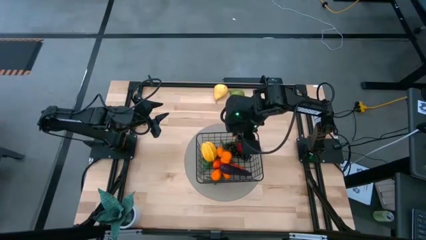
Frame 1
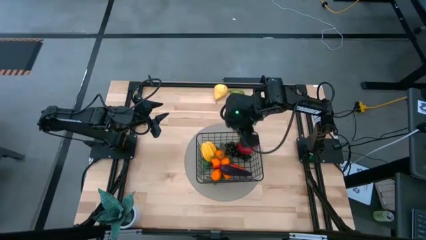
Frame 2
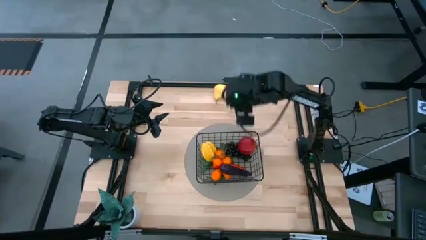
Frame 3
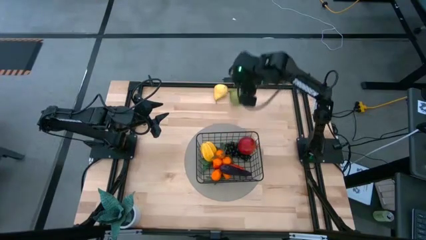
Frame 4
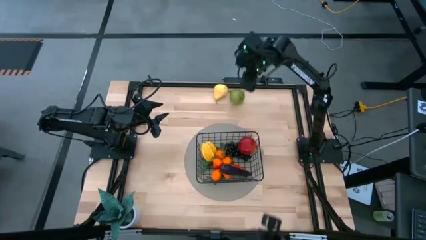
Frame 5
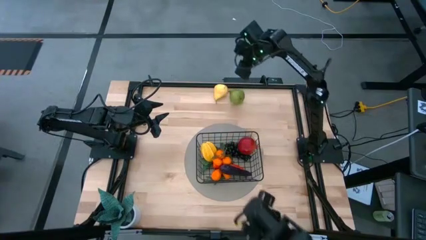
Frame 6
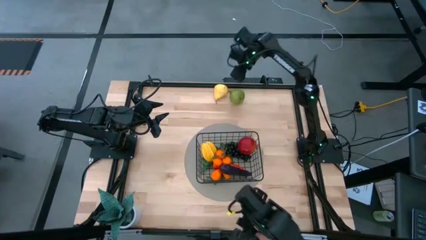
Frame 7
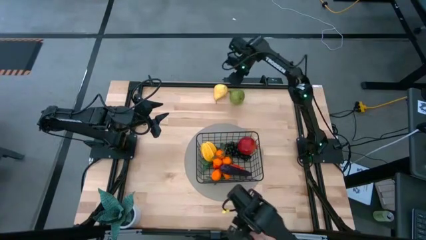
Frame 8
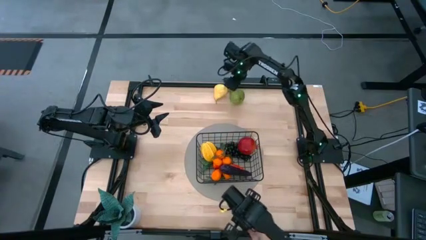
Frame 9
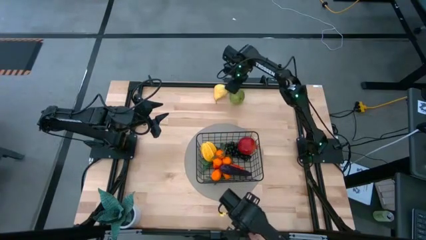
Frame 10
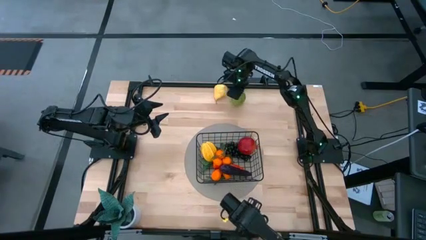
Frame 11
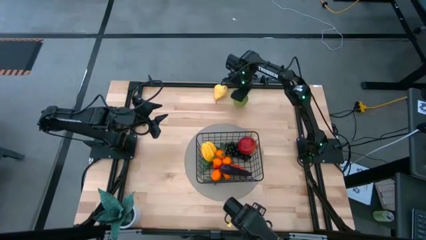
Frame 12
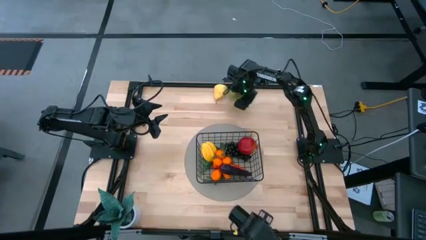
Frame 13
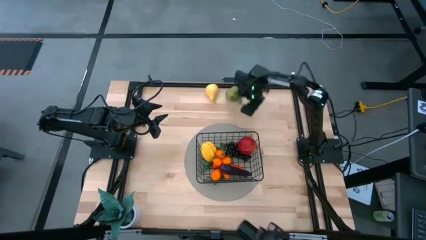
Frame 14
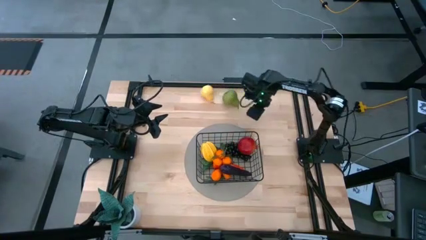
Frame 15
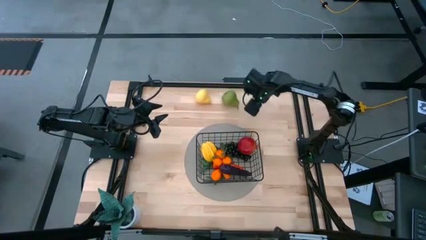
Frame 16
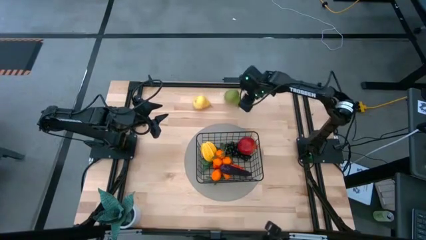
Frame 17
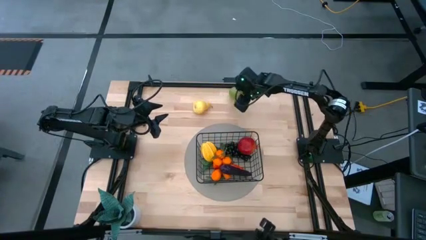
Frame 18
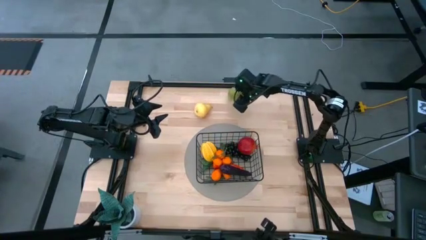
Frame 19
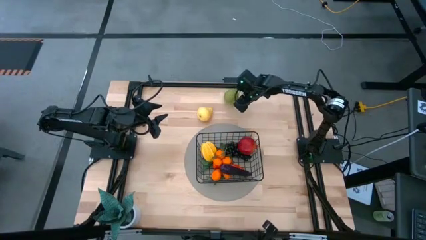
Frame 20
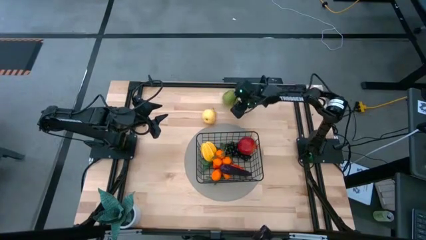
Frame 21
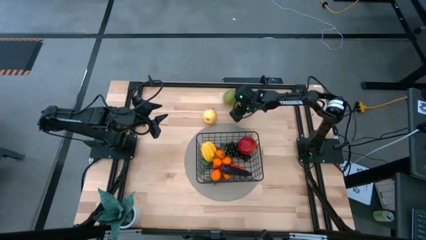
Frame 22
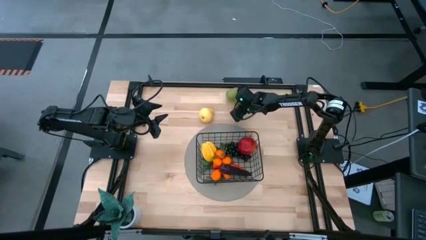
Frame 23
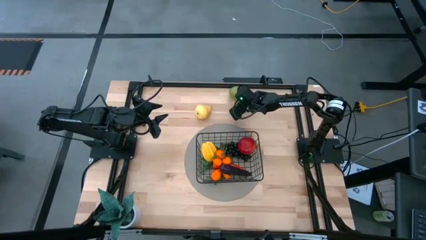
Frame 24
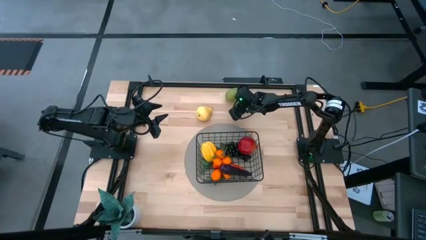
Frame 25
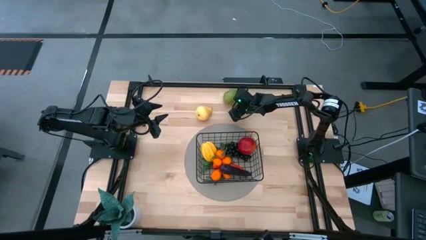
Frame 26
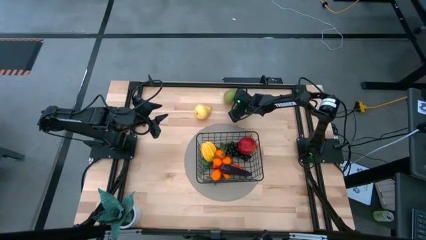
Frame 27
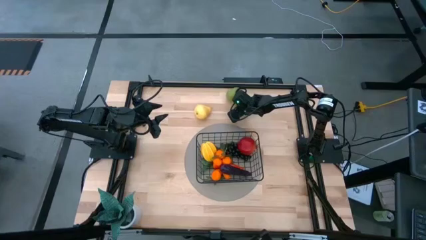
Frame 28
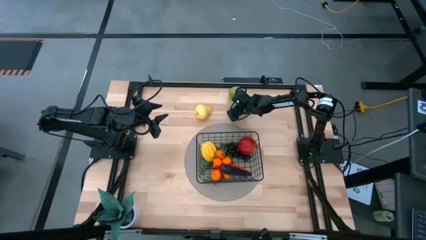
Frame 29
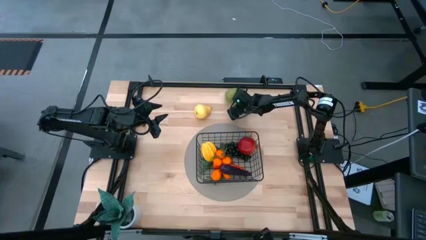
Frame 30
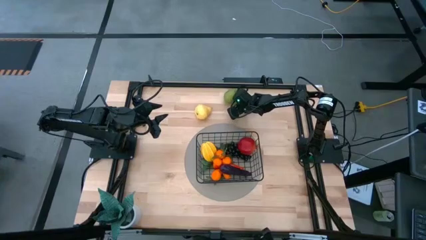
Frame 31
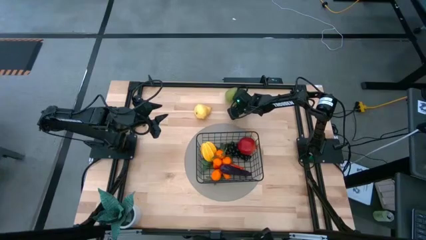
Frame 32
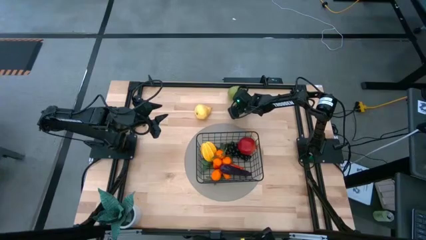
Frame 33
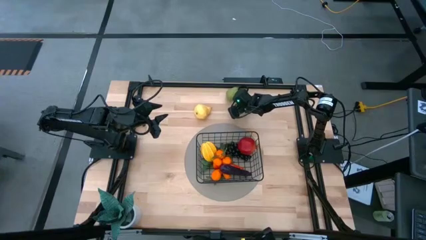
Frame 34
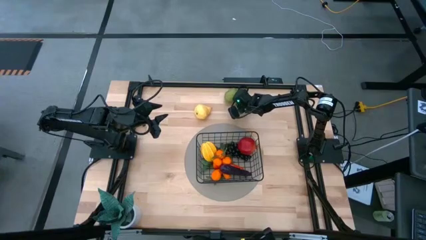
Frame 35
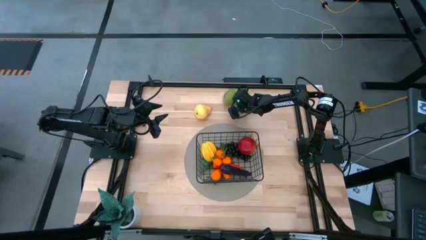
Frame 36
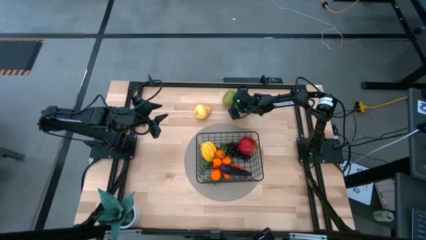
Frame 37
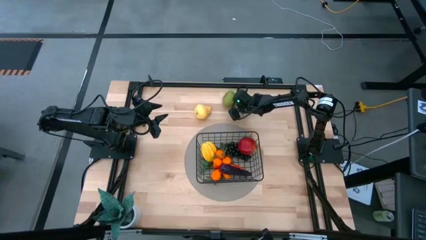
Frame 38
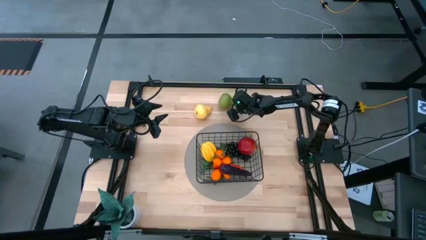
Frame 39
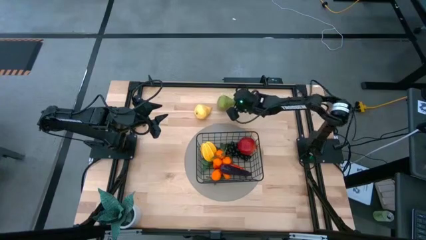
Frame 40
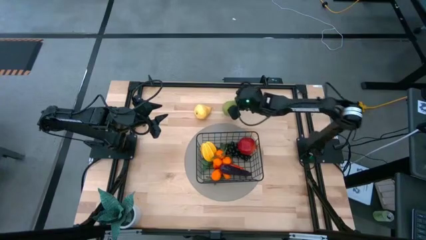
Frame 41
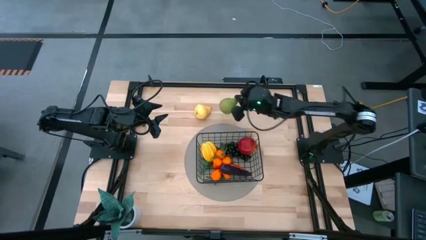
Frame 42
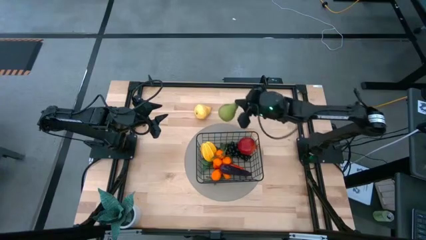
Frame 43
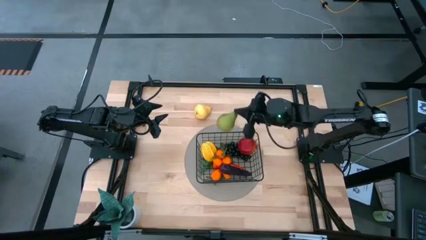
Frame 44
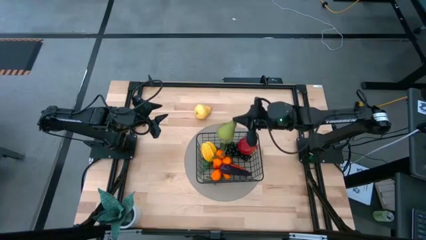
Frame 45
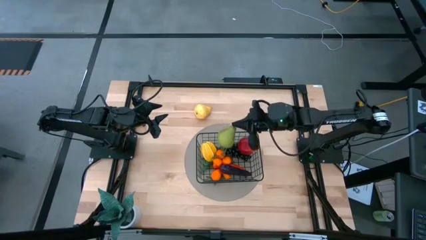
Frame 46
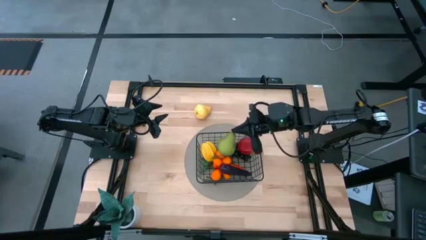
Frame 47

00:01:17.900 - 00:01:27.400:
Task: Build produce basket
Put the green pear into the wire basket

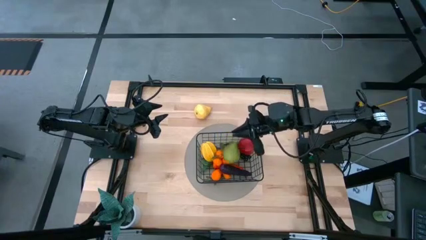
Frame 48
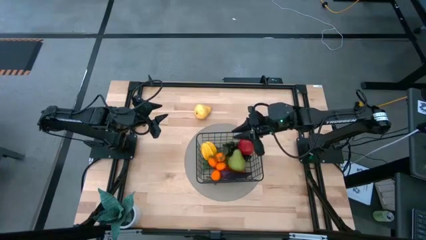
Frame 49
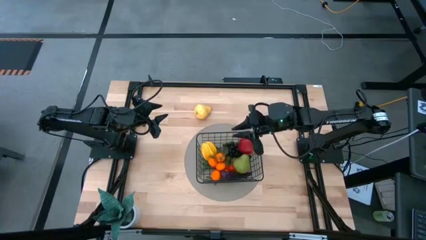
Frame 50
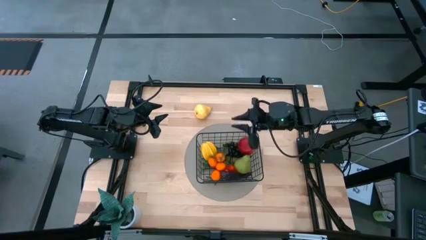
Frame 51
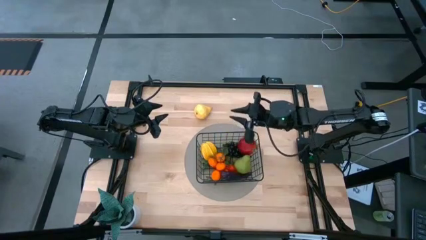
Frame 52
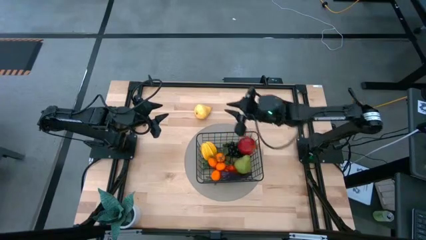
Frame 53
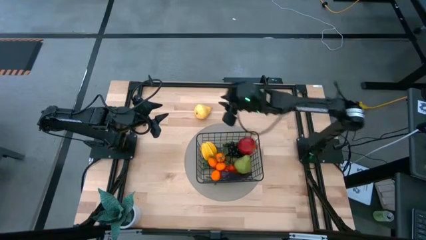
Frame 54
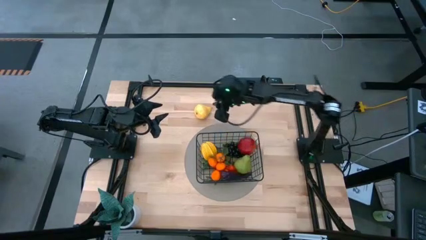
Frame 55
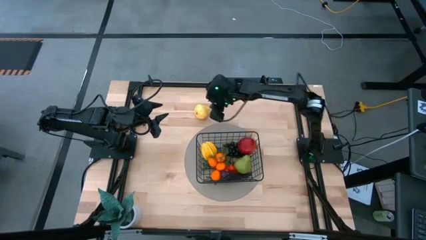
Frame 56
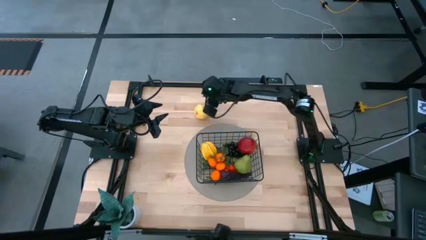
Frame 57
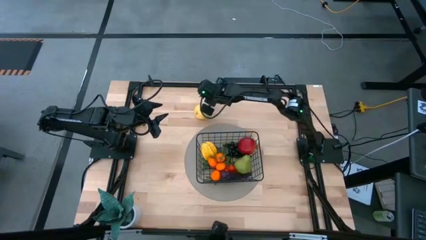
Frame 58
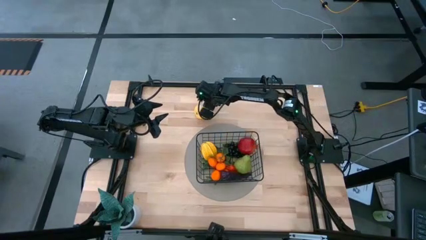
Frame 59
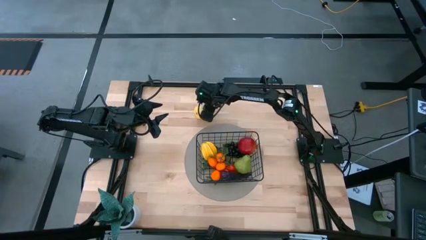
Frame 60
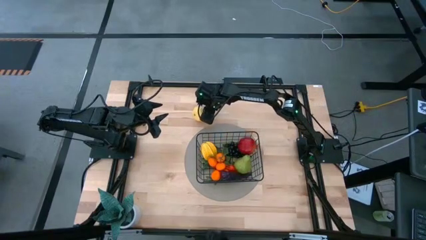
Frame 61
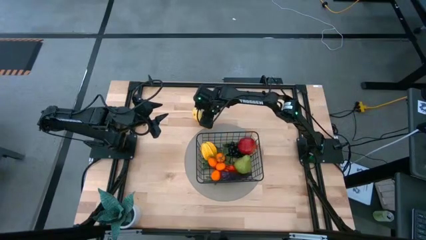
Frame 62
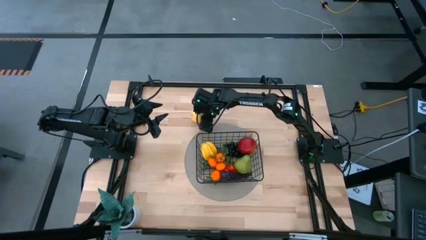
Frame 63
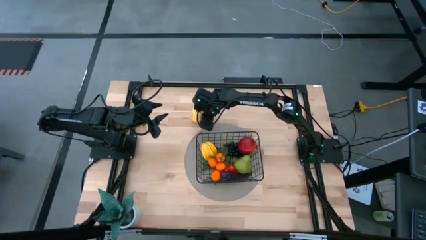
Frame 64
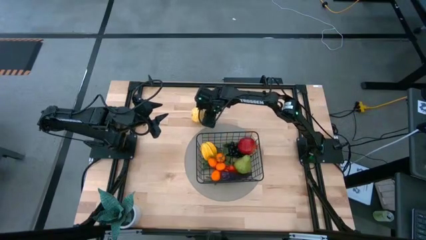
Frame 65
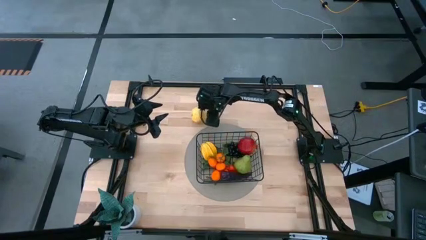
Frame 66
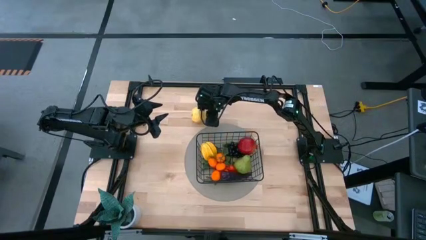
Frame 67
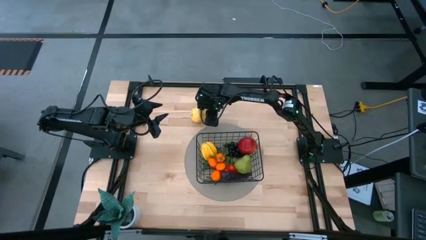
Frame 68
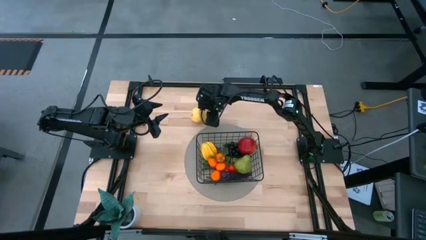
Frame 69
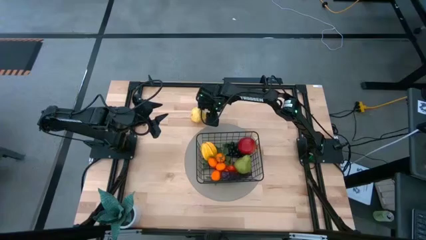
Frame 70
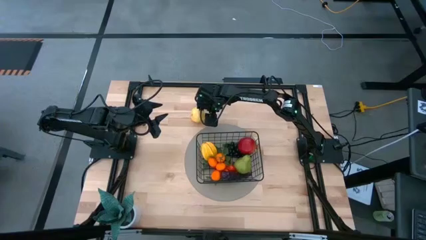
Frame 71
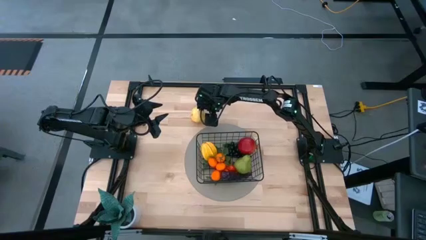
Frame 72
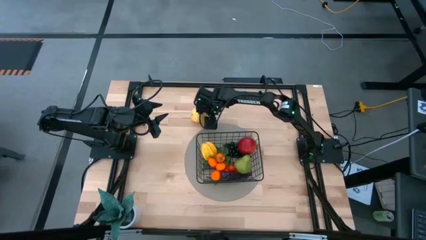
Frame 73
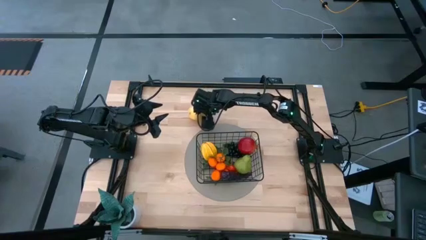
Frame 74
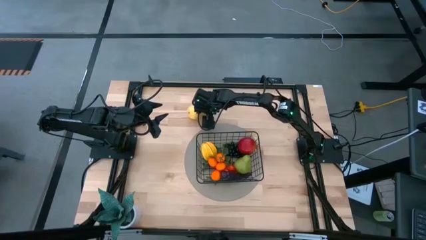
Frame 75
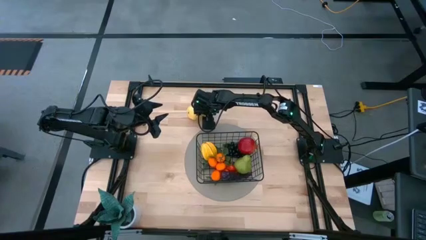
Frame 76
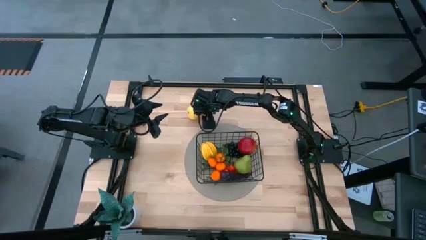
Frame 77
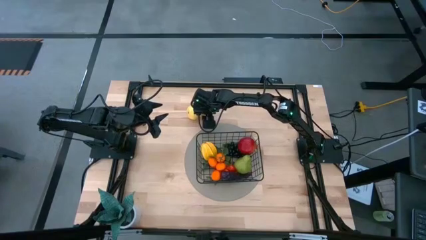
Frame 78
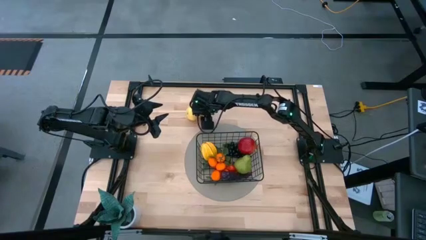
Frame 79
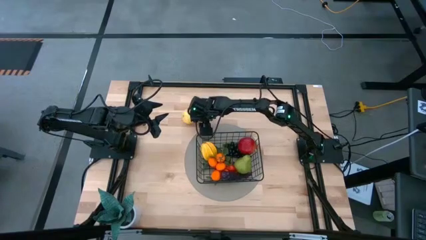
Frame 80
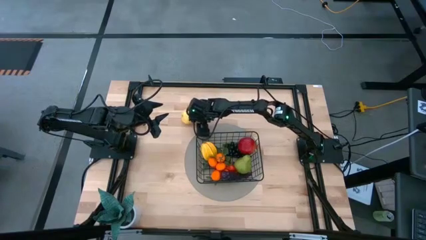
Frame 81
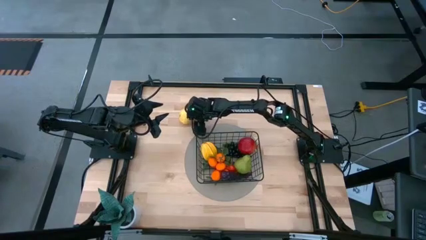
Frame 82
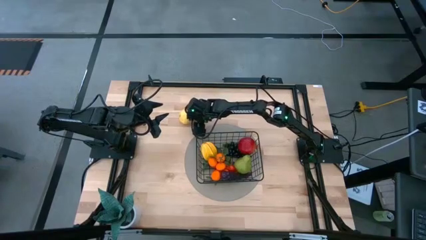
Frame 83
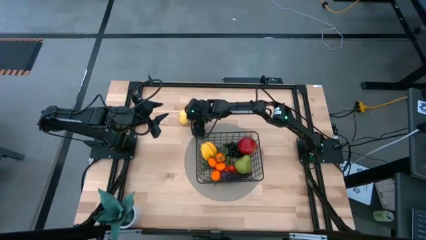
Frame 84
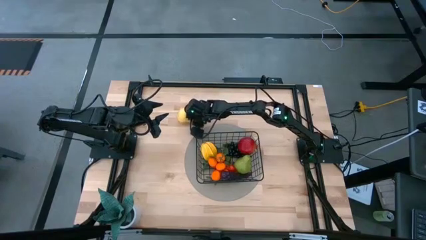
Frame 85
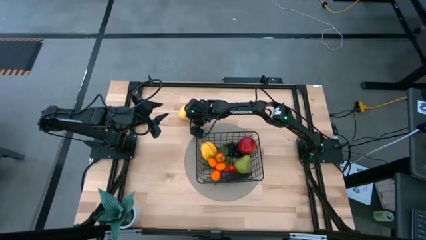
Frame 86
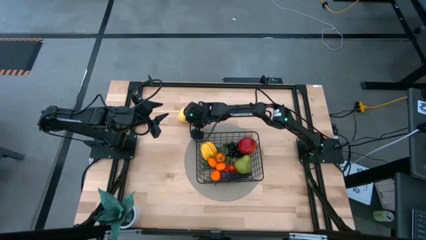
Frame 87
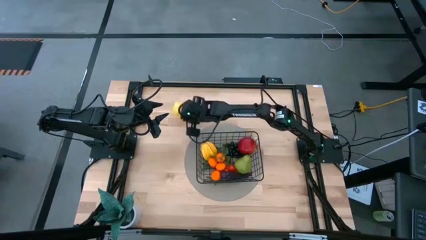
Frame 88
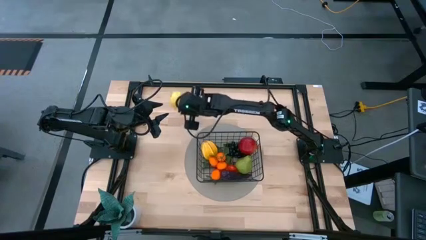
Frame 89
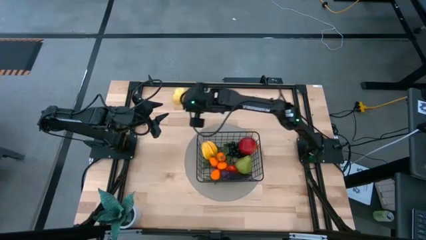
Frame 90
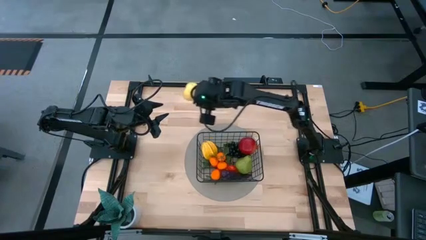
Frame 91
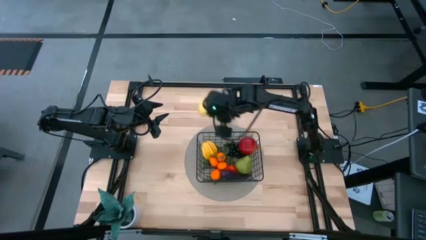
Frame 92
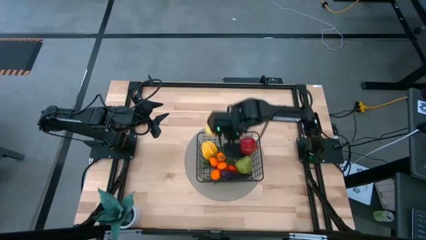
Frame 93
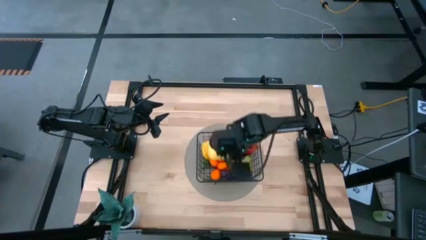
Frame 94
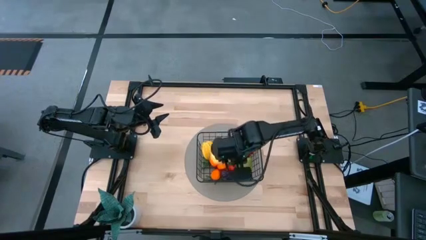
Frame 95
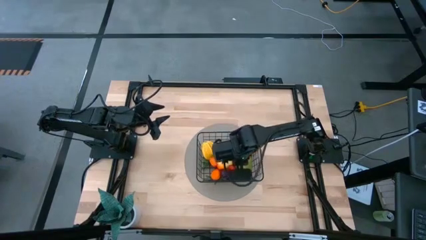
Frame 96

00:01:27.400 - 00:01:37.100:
Put the yellow pear into the wire basket
